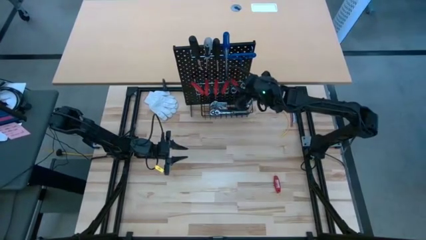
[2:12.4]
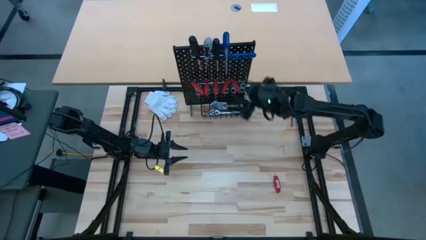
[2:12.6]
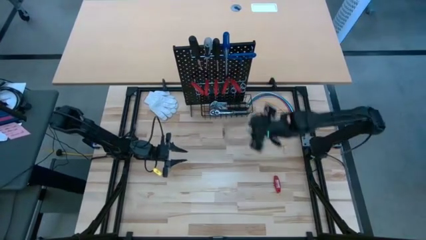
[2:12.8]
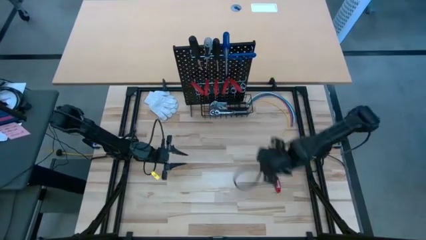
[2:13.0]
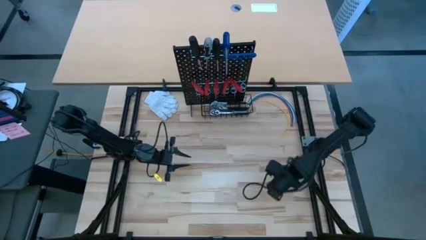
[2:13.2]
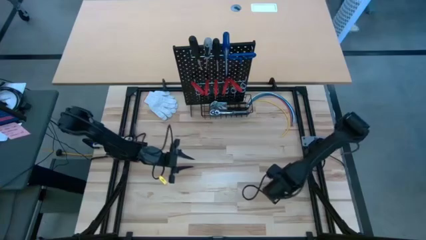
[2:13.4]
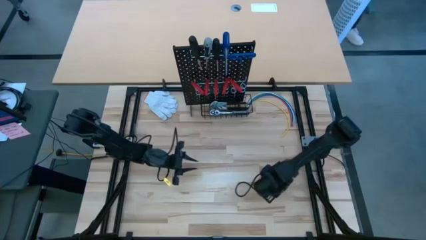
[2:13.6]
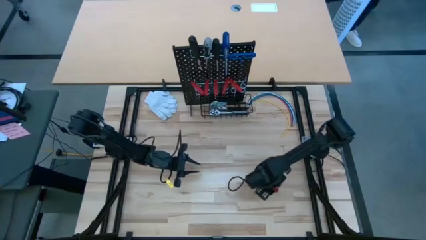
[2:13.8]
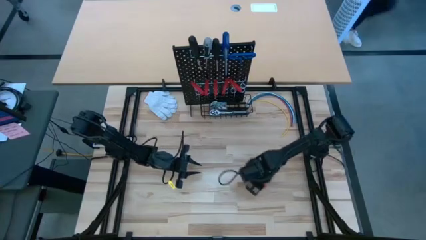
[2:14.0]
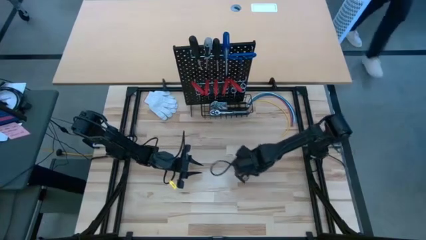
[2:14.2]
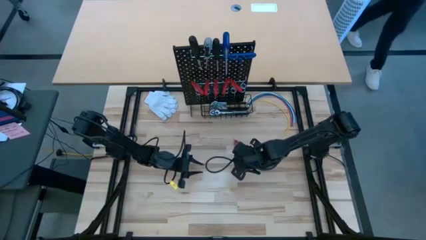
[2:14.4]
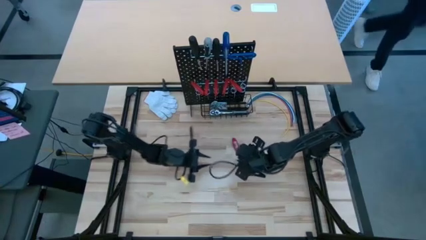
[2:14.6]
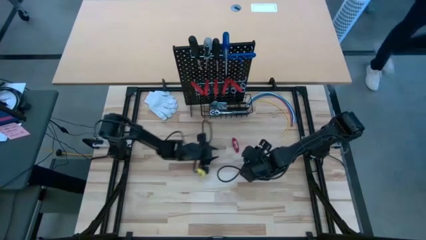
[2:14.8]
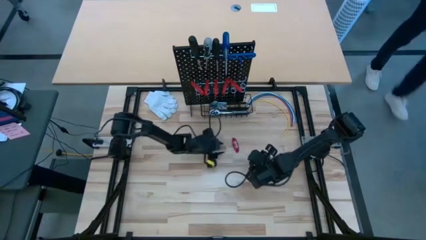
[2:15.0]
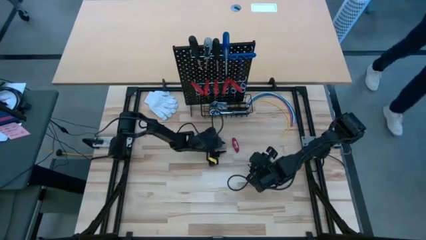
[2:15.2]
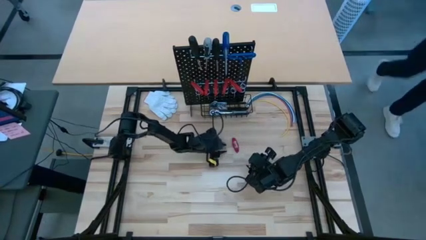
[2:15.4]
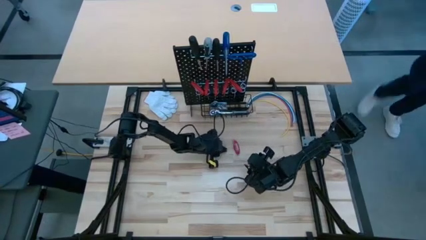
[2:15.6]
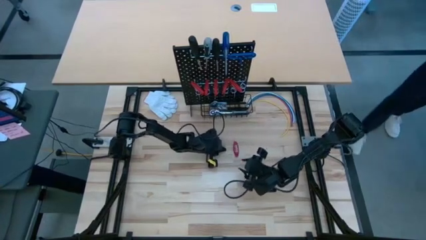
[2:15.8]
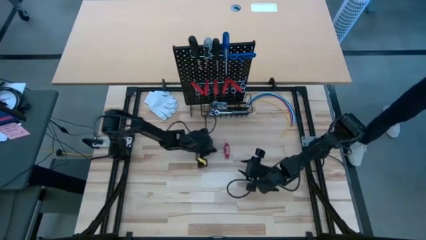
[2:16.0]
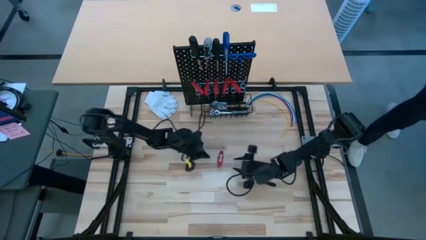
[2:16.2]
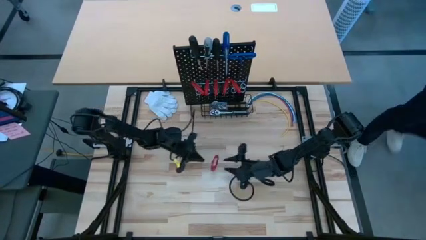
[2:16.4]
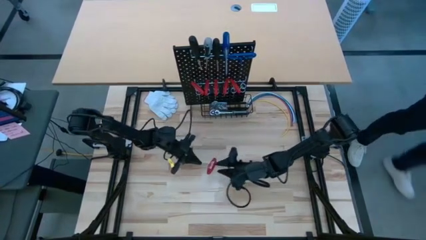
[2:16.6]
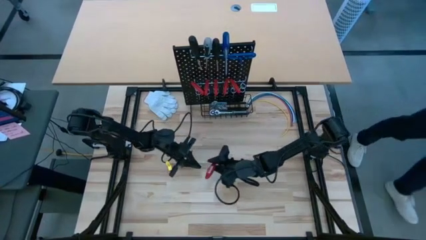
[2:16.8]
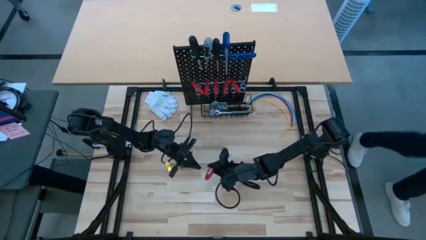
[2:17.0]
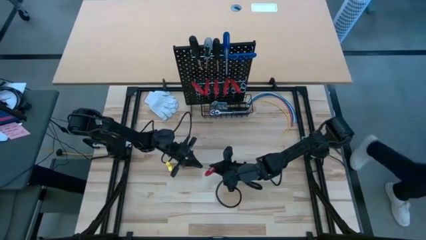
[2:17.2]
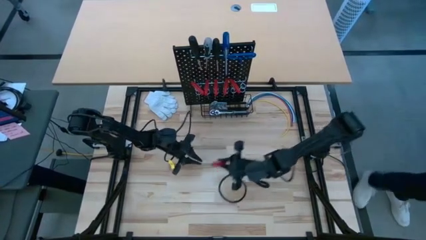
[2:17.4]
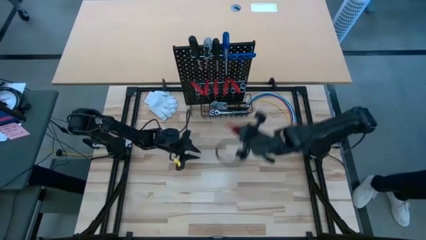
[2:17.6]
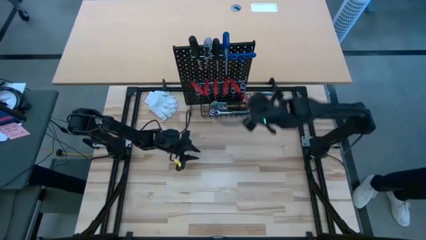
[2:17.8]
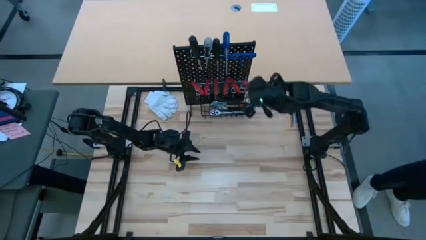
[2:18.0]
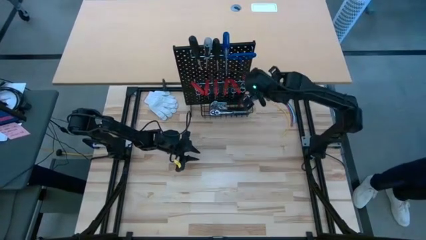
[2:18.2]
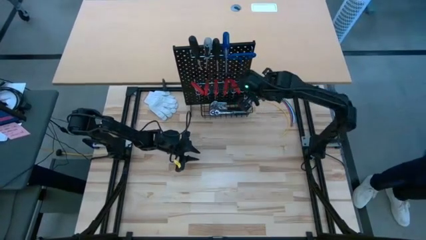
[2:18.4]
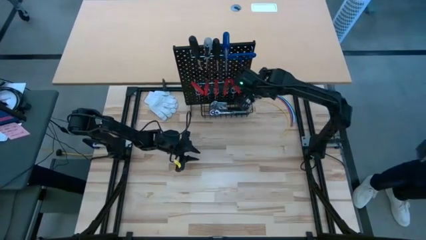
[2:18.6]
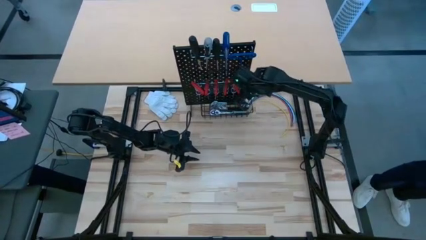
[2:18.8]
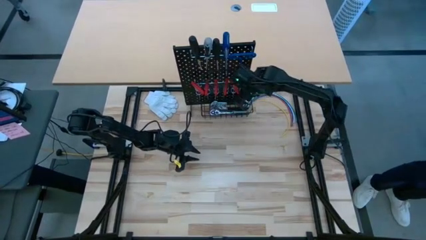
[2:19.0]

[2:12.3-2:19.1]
Task: Hang tools onto peg board
Hang the red allen wrench on the pegboard

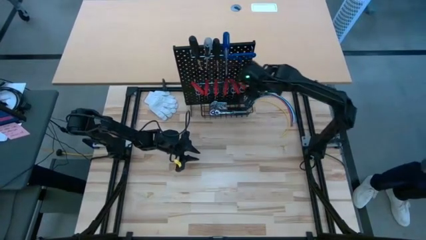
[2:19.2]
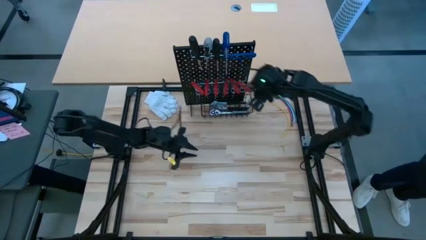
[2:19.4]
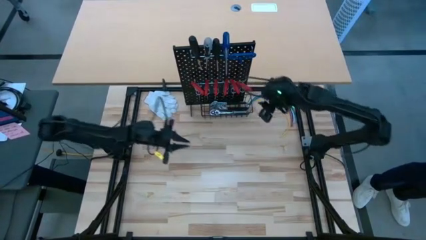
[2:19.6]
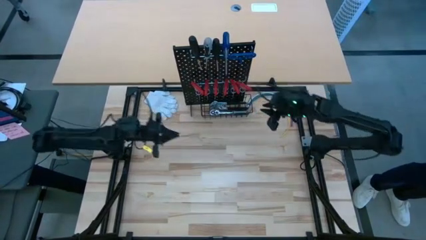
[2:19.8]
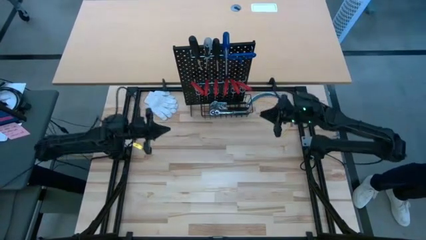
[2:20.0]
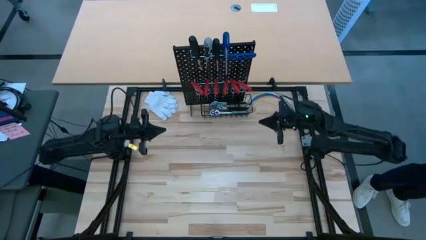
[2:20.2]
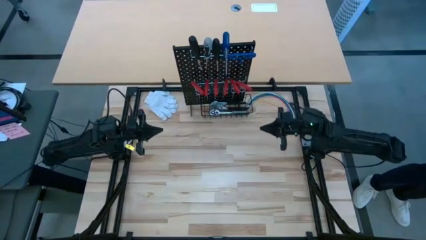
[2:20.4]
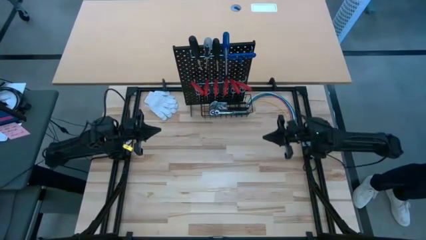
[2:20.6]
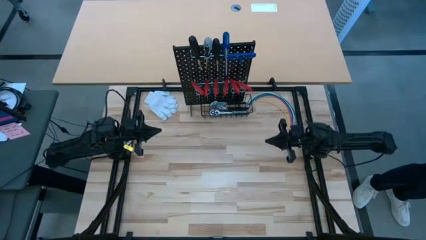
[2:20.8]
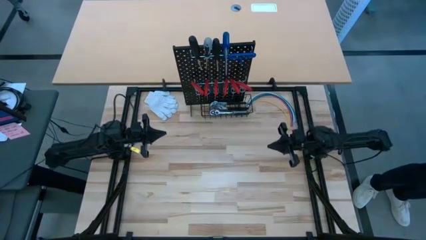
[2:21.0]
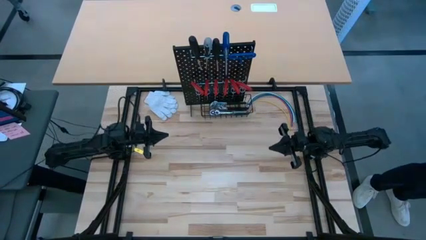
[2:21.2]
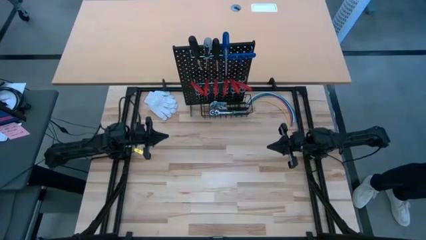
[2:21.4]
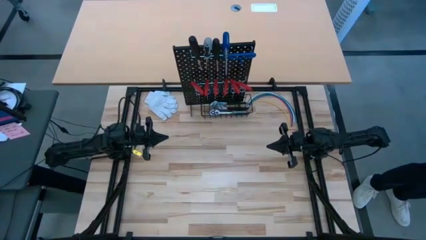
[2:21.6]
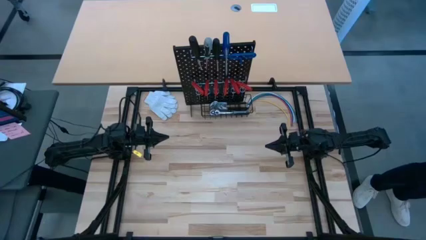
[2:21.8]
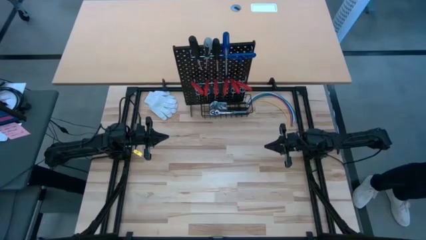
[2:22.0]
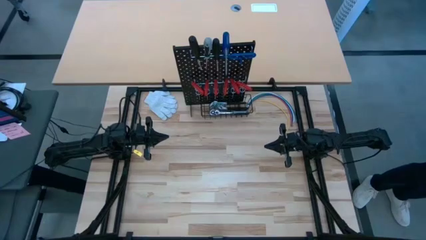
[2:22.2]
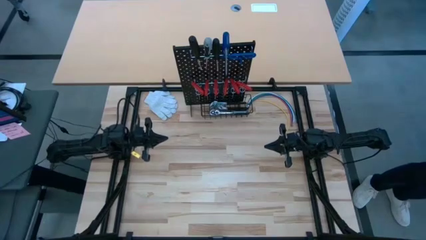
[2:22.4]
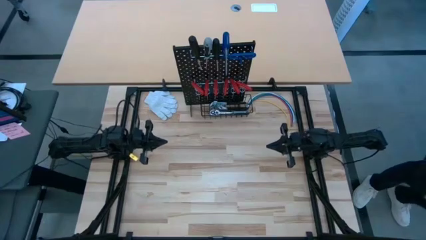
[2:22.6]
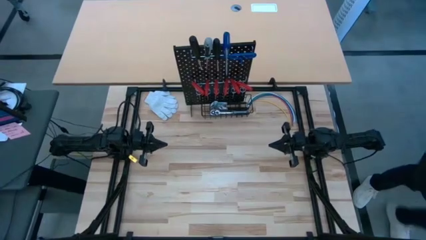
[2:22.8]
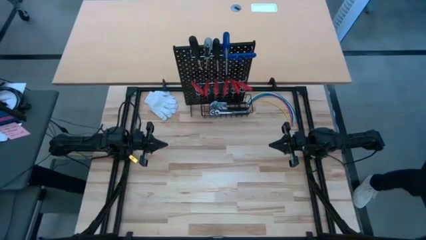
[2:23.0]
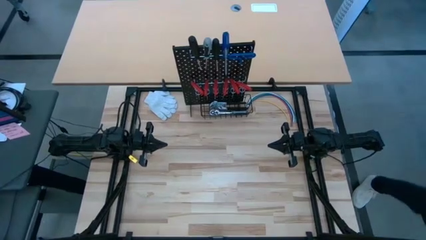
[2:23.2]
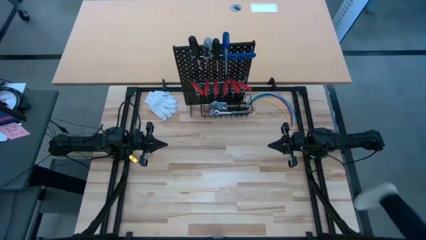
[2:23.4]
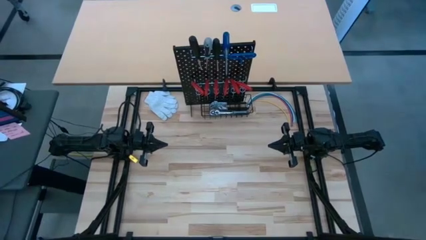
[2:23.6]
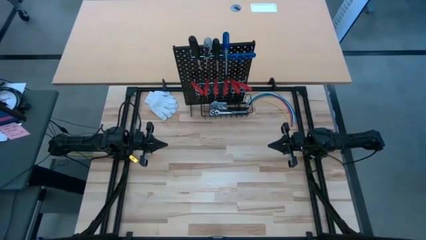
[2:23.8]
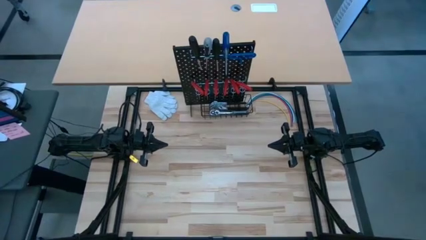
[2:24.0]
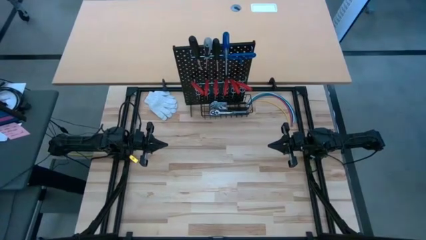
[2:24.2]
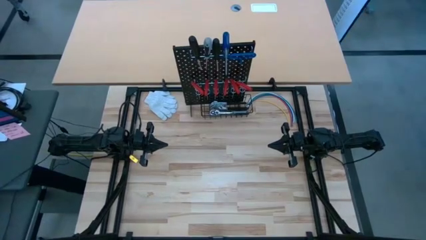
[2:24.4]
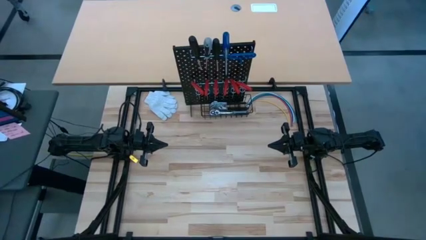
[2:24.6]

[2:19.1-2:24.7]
Return to Home Position
